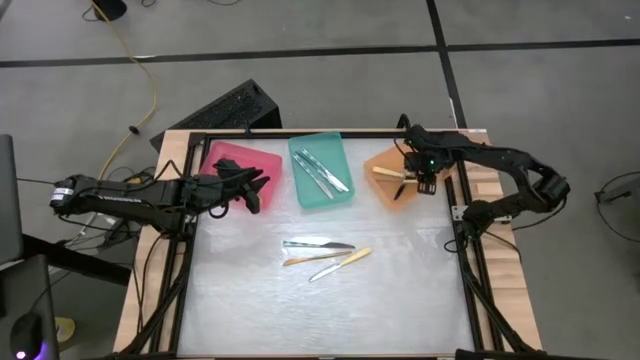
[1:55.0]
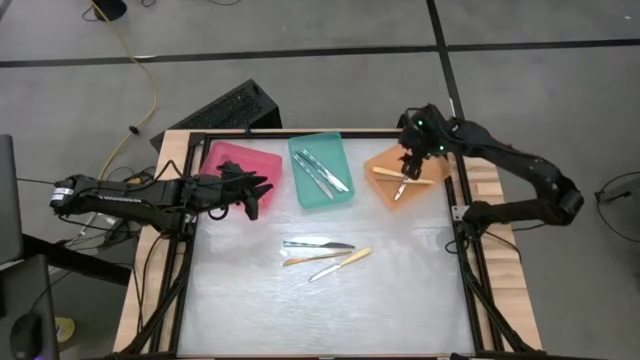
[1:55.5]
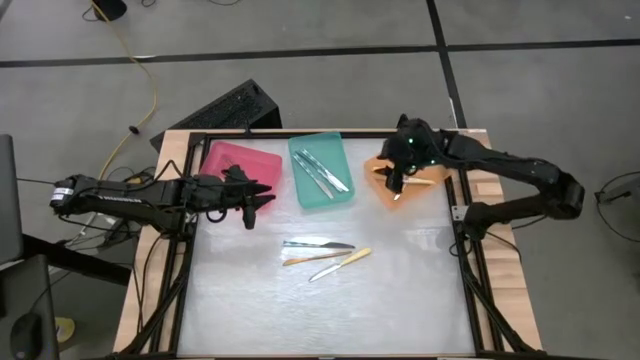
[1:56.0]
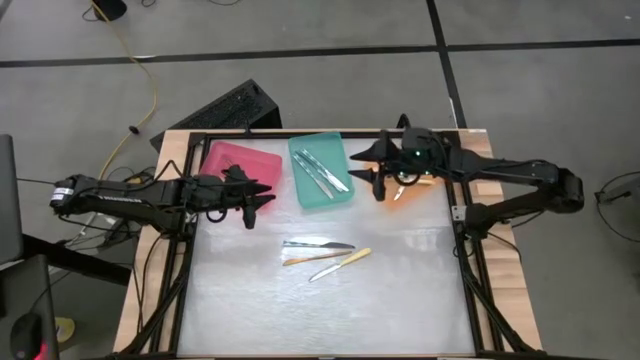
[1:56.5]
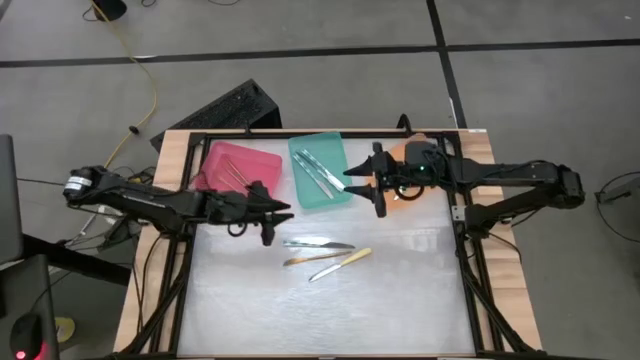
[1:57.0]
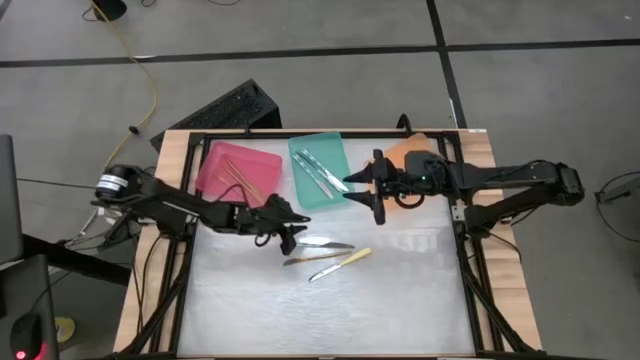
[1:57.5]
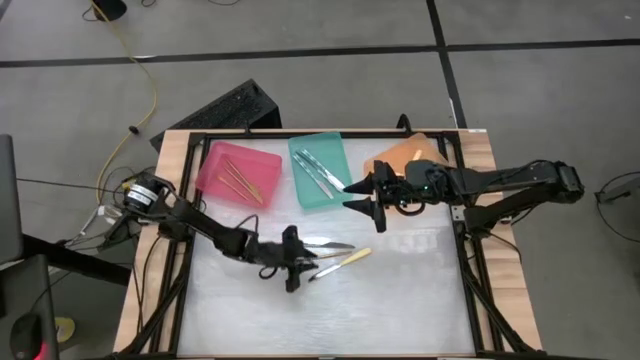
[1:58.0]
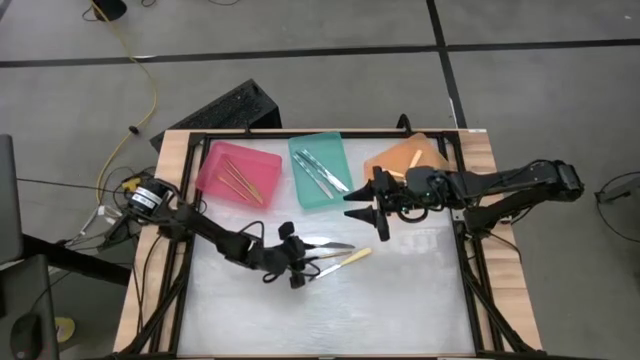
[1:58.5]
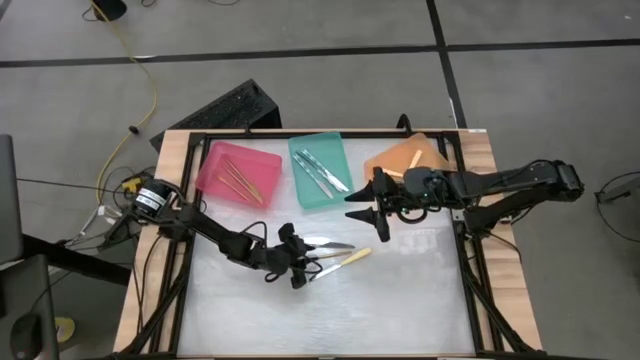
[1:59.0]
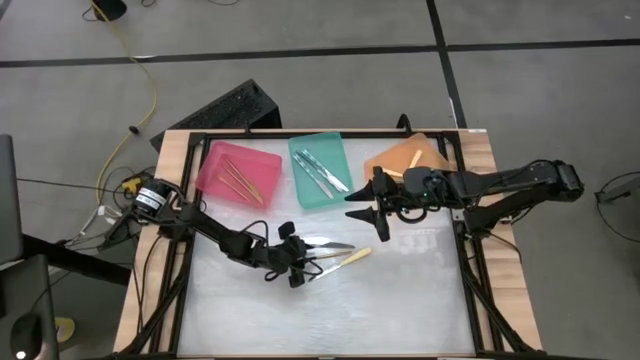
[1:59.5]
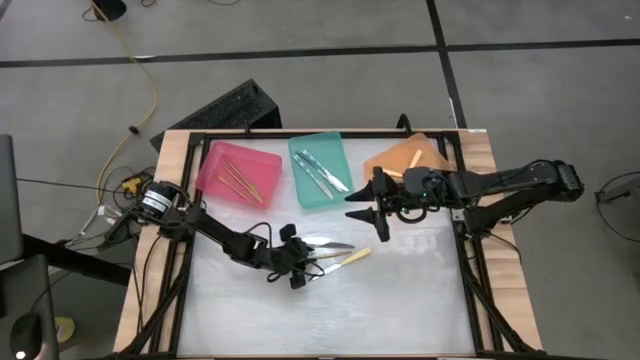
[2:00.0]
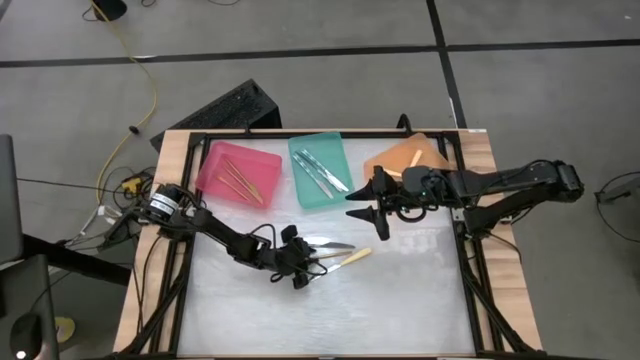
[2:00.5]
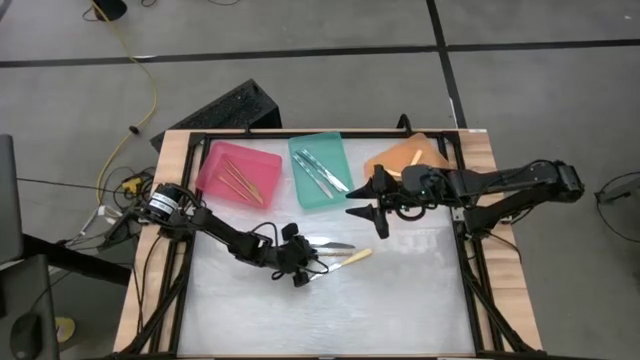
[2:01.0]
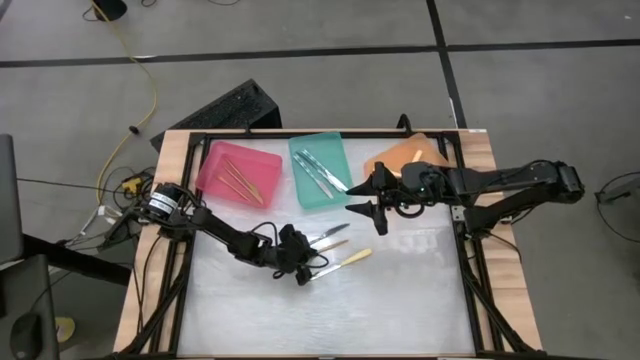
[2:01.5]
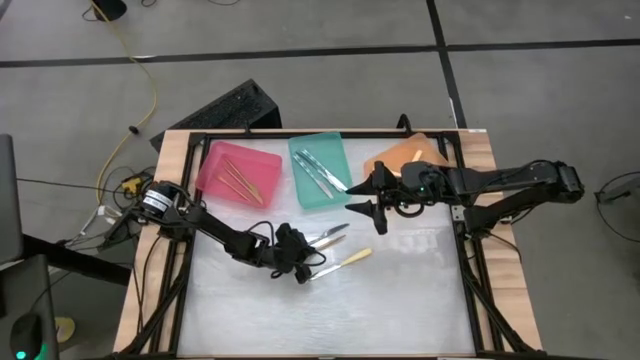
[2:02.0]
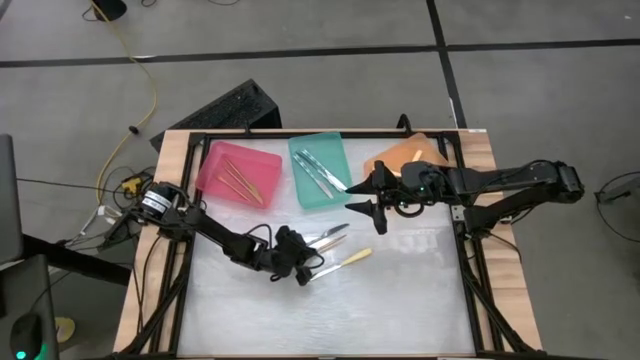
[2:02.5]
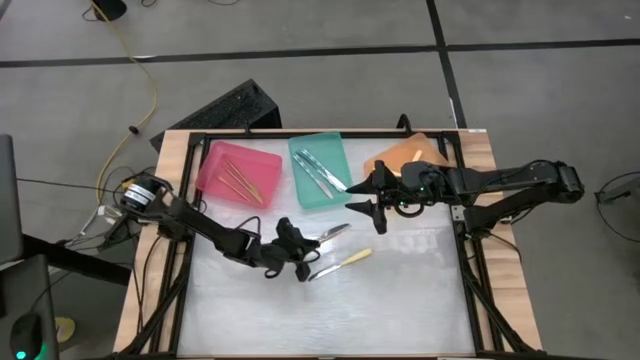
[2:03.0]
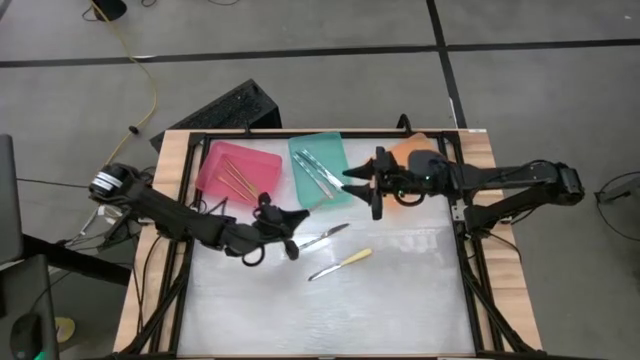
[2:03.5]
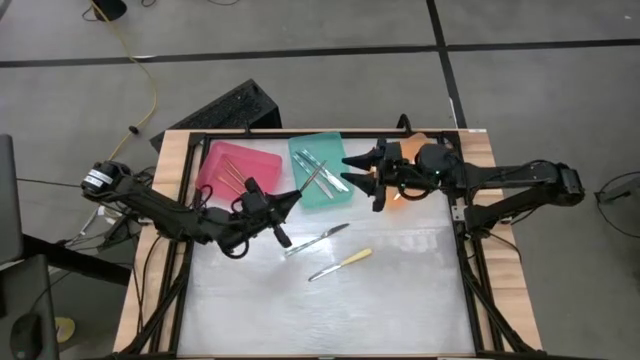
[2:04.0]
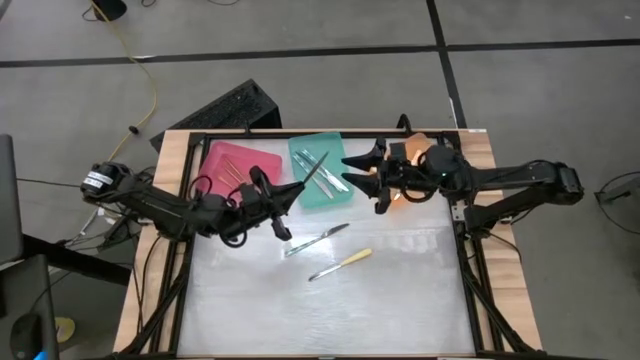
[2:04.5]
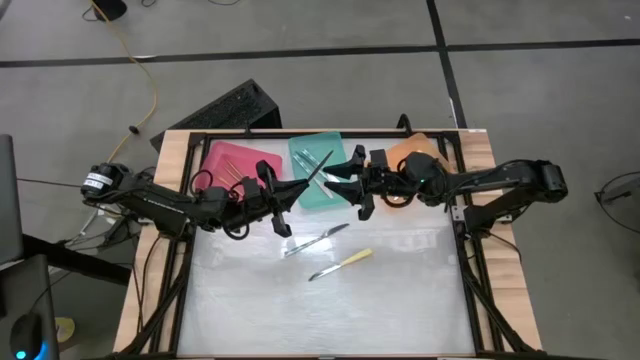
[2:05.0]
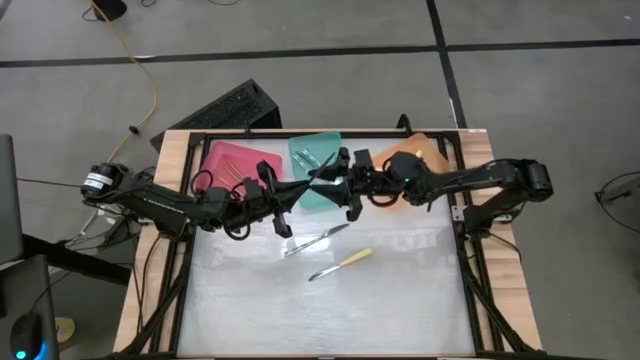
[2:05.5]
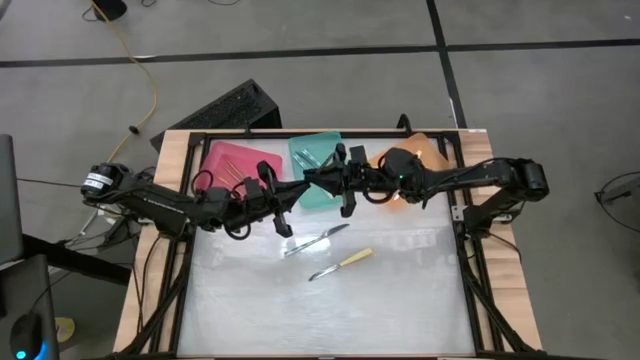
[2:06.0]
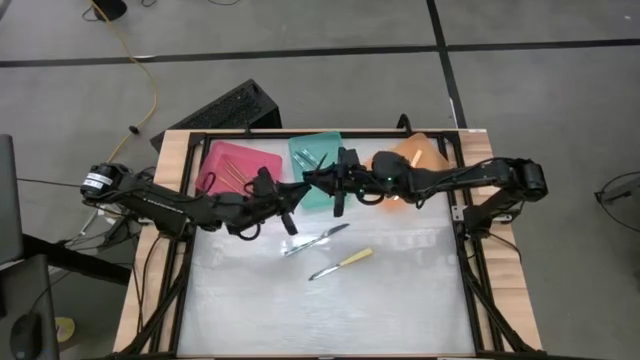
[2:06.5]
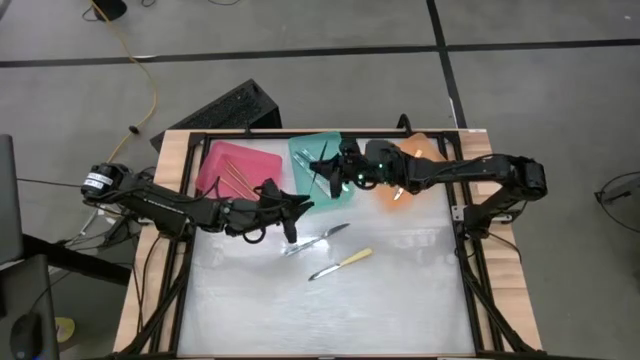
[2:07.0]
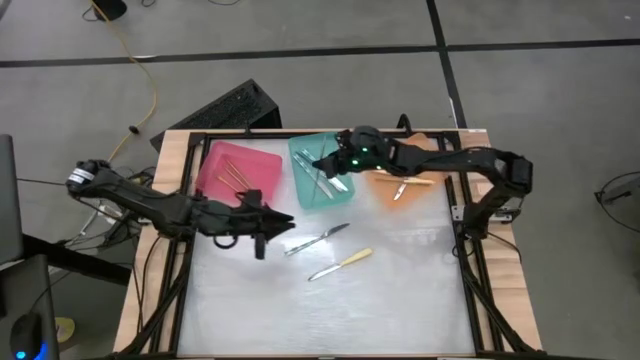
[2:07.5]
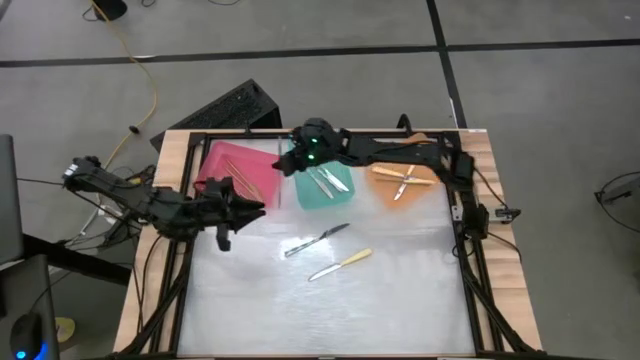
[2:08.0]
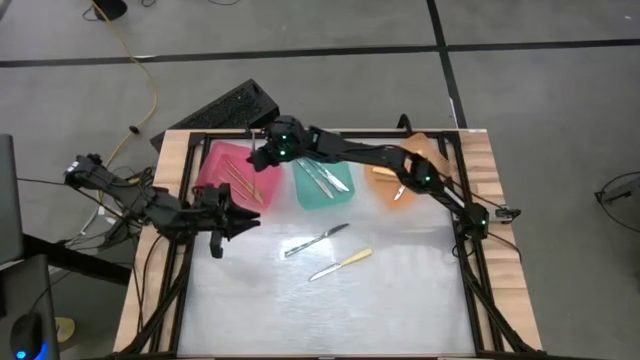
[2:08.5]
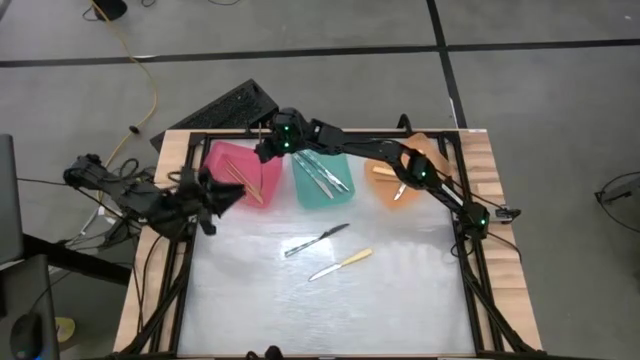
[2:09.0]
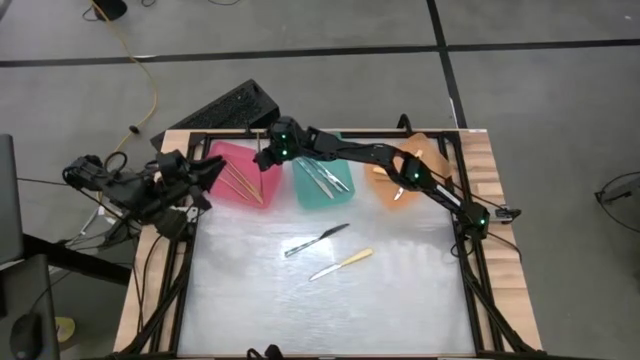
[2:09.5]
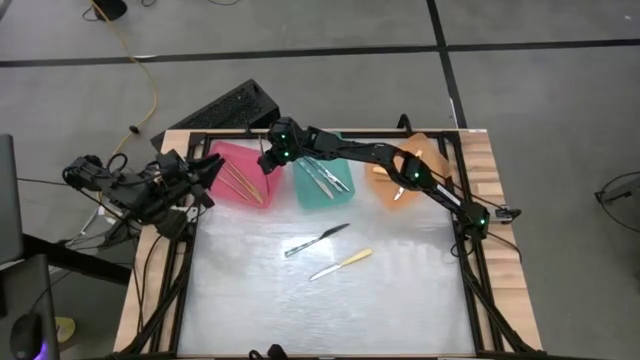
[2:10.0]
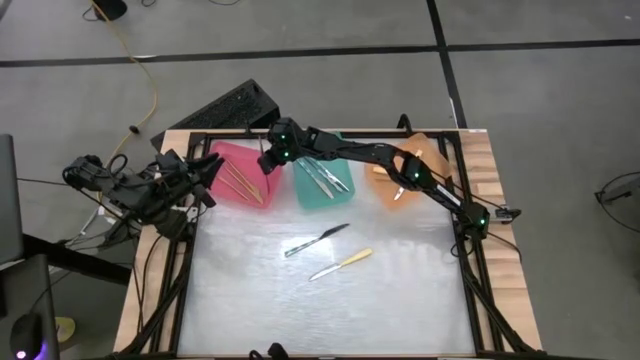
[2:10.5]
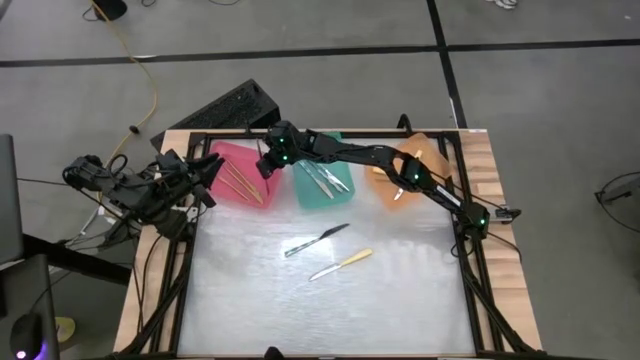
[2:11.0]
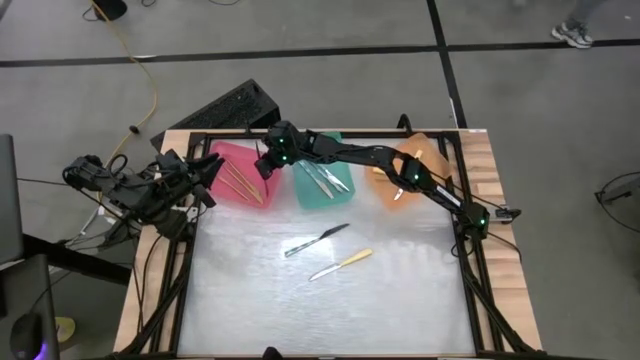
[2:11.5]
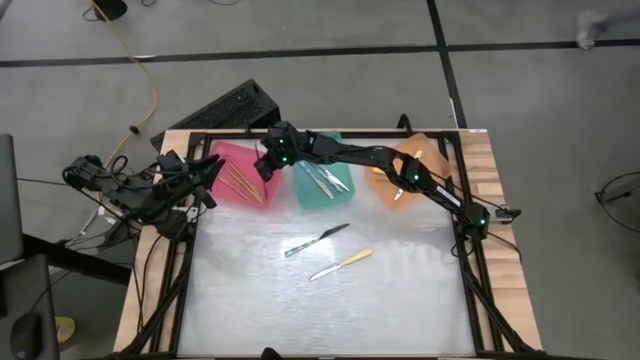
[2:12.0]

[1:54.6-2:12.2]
Task: Sort silverware by color (type)
Put the gold knife into the red bin

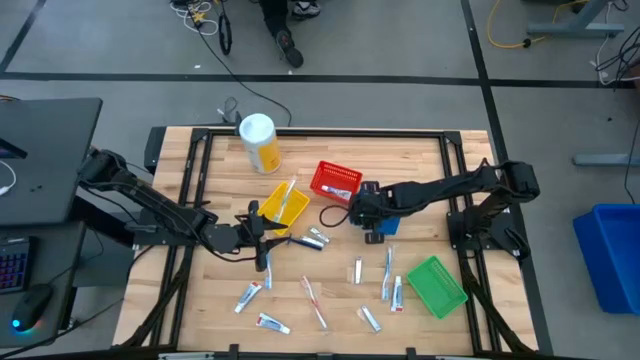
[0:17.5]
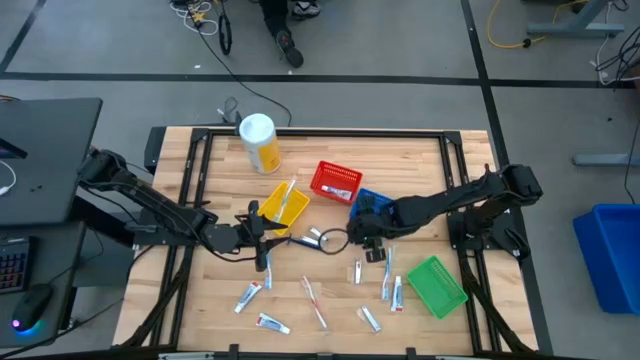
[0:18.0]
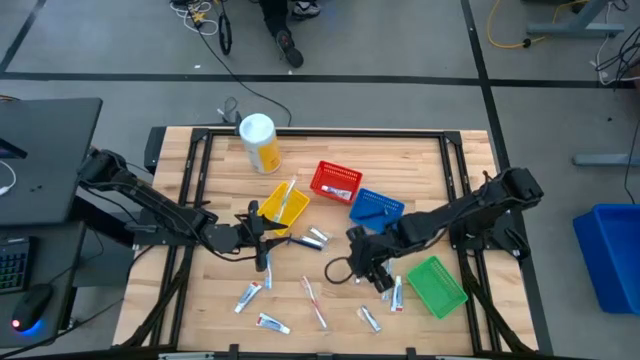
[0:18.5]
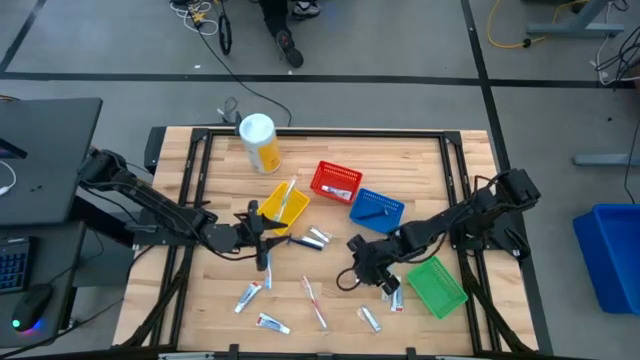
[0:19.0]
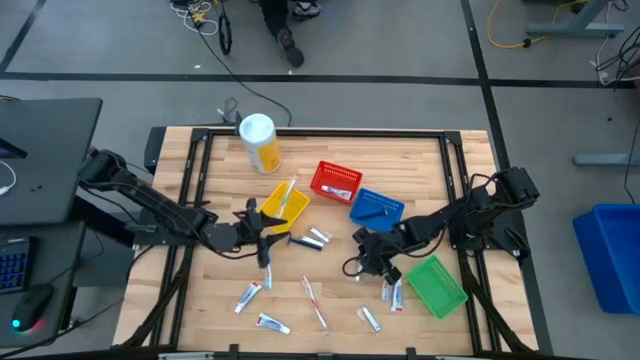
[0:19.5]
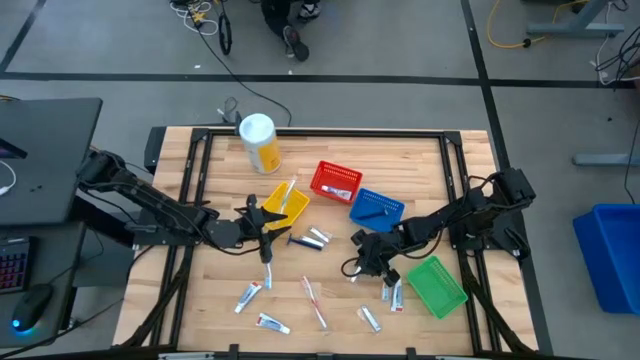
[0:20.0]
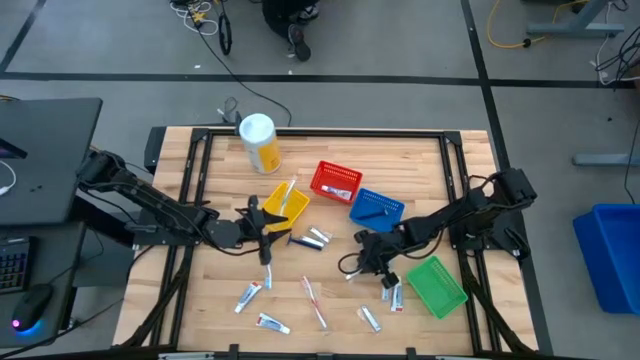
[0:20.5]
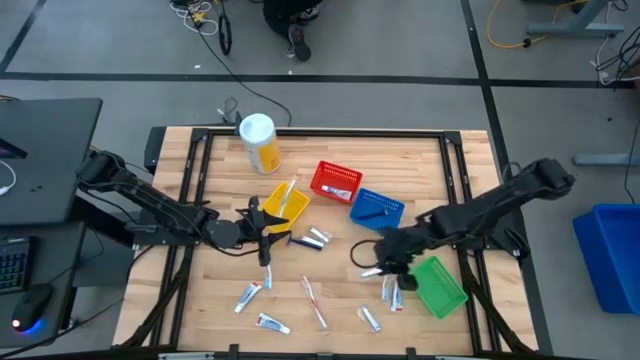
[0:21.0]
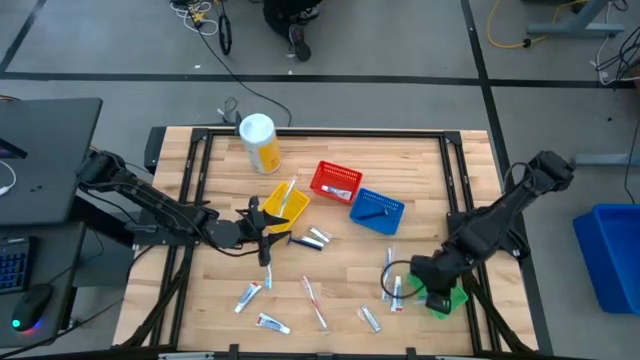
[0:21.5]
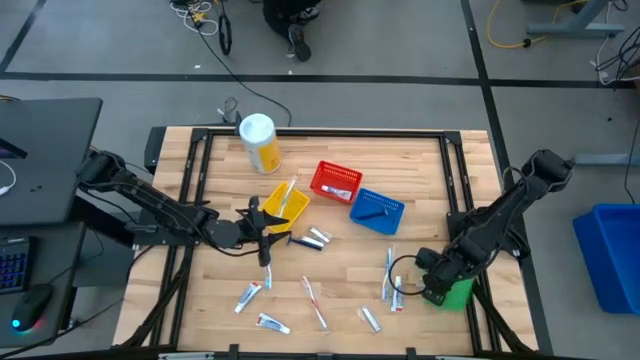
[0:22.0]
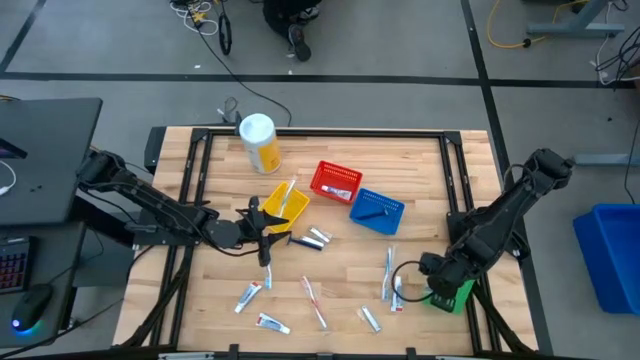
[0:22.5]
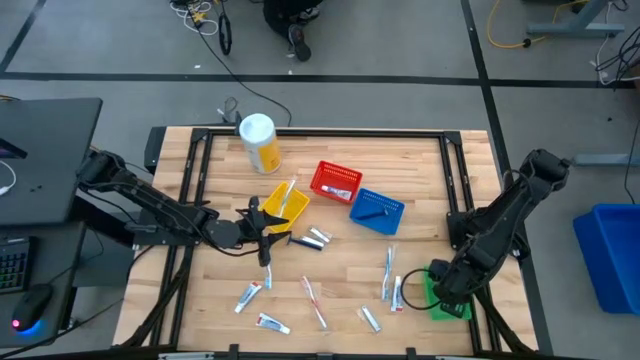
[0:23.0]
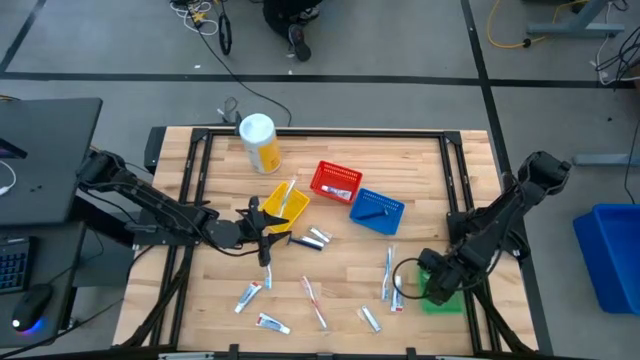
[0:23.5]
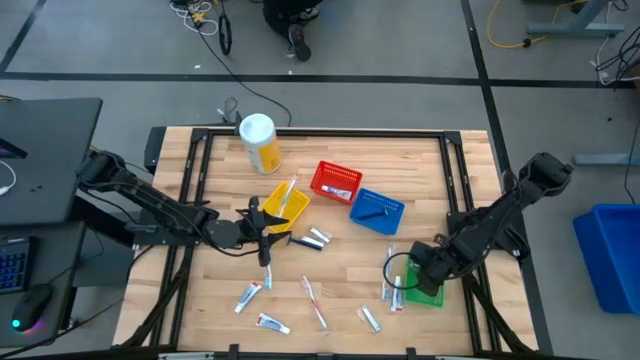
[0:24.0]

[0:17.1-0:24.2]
Task: Pick & Place Travel size toiletries
Put the silver nail cutter into the green bin
